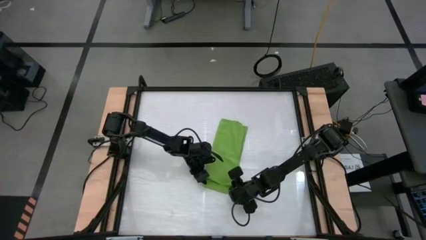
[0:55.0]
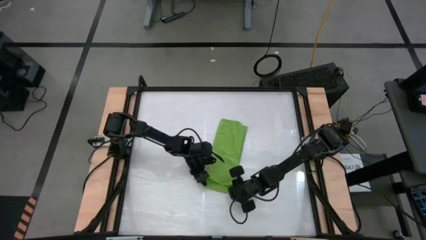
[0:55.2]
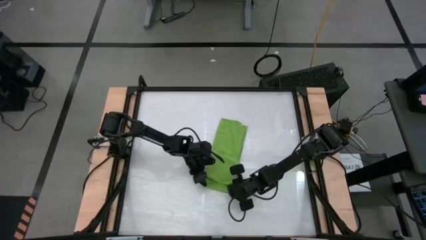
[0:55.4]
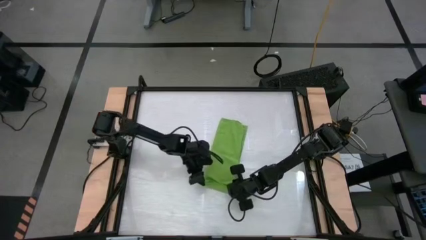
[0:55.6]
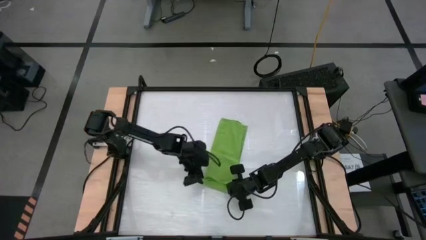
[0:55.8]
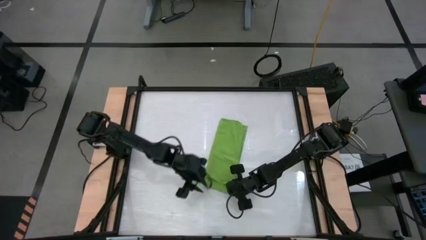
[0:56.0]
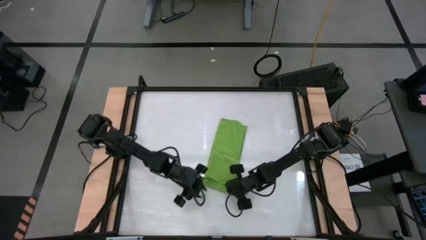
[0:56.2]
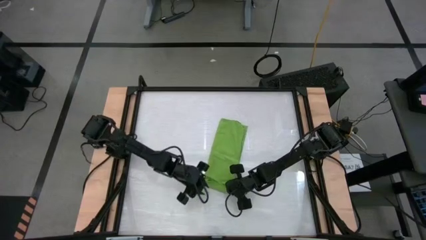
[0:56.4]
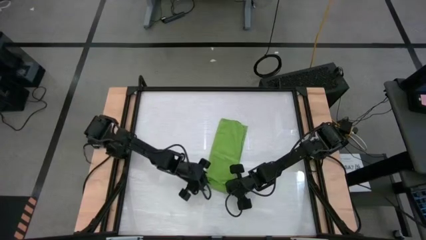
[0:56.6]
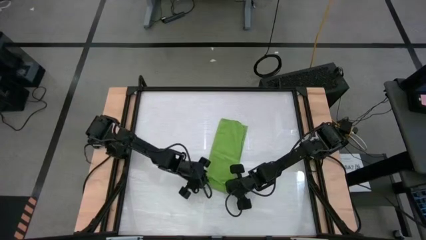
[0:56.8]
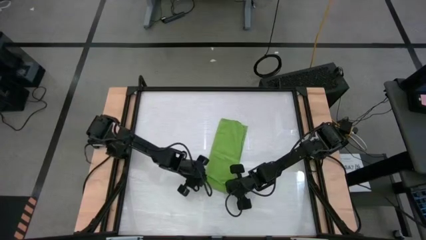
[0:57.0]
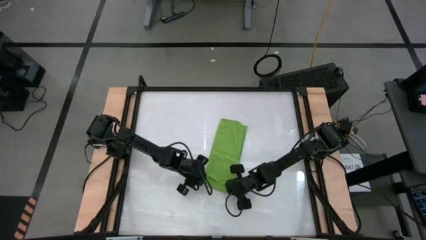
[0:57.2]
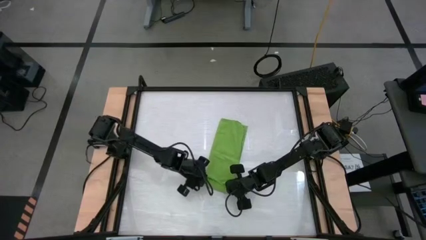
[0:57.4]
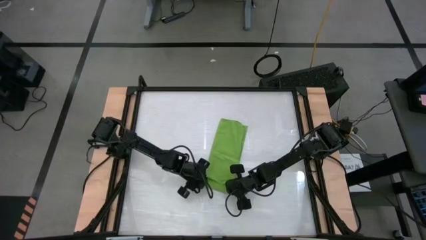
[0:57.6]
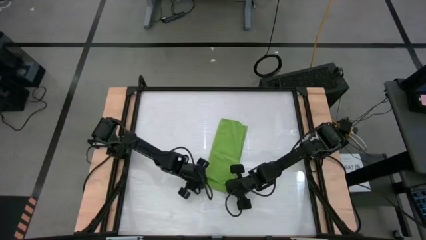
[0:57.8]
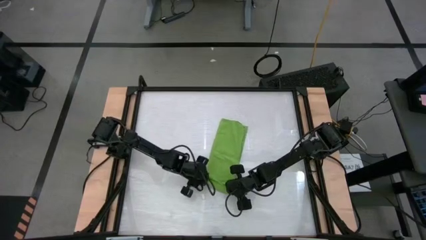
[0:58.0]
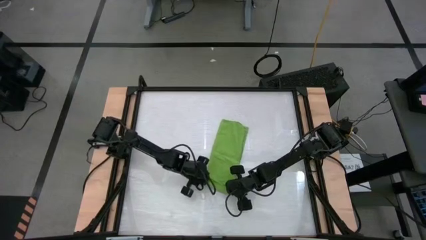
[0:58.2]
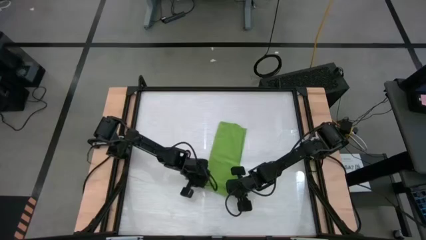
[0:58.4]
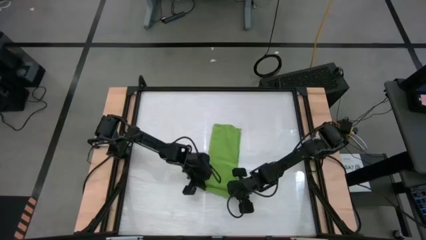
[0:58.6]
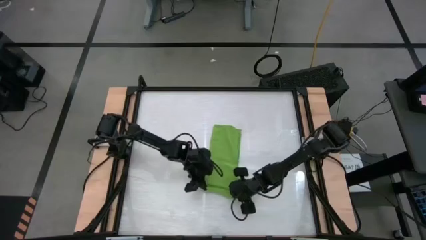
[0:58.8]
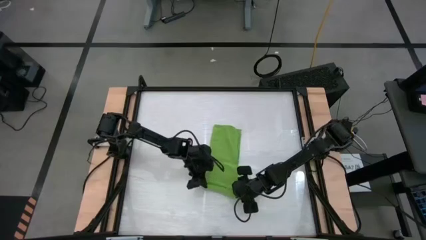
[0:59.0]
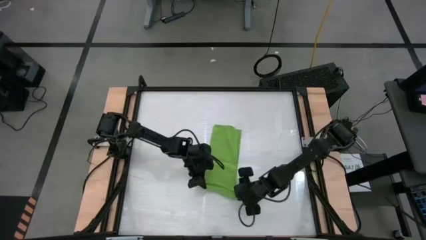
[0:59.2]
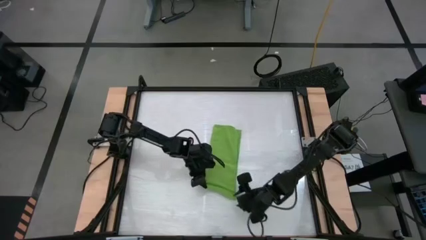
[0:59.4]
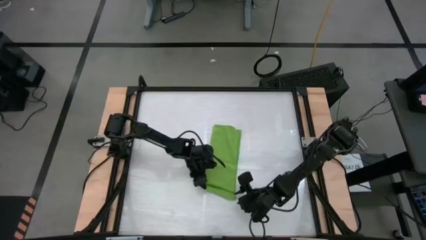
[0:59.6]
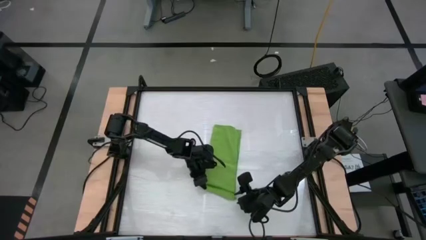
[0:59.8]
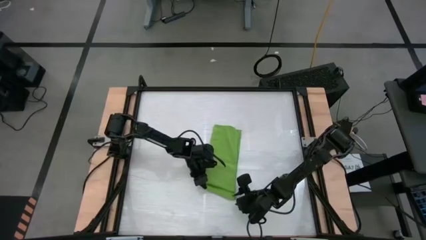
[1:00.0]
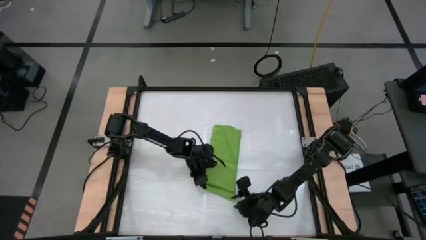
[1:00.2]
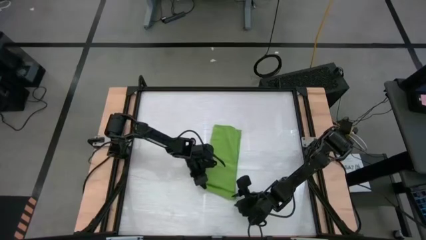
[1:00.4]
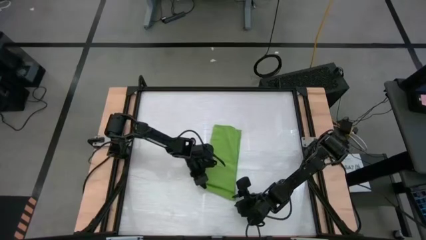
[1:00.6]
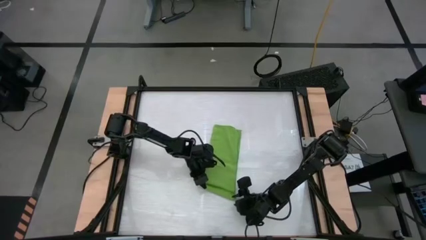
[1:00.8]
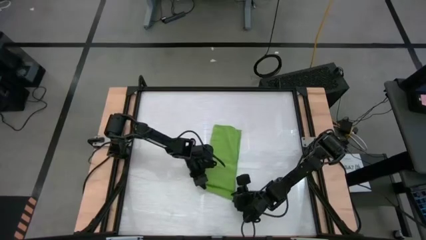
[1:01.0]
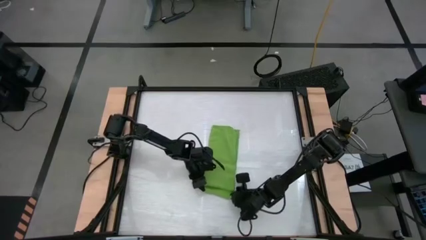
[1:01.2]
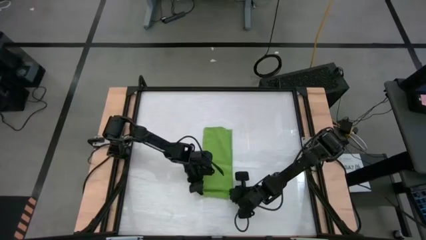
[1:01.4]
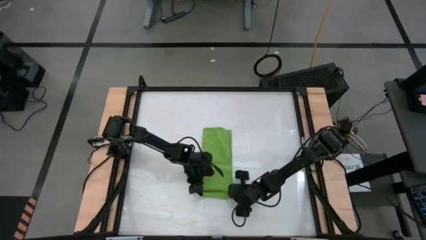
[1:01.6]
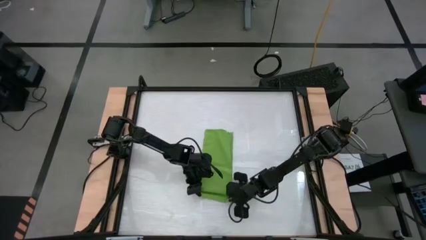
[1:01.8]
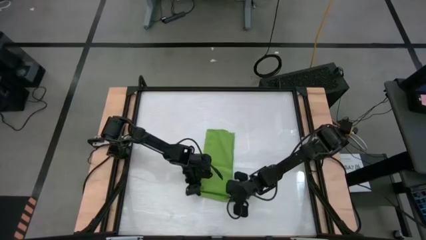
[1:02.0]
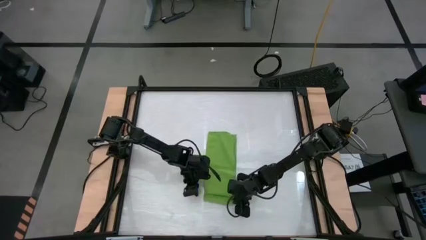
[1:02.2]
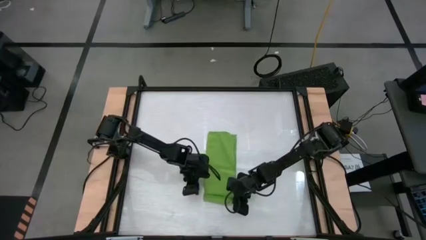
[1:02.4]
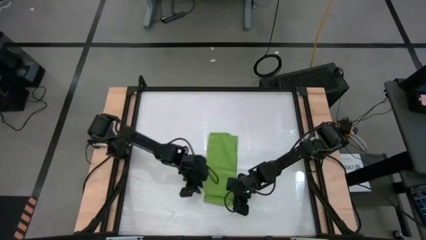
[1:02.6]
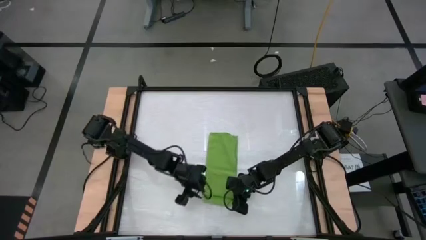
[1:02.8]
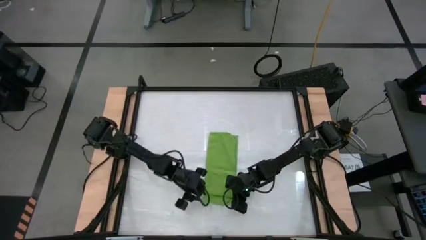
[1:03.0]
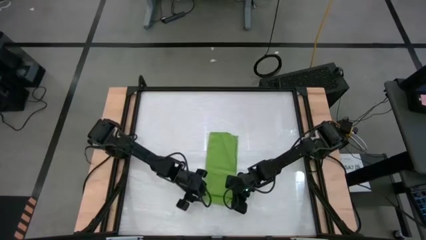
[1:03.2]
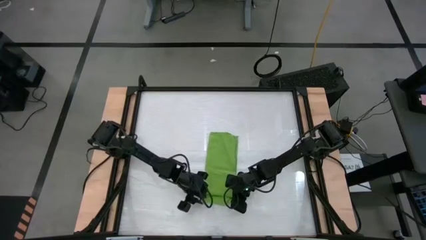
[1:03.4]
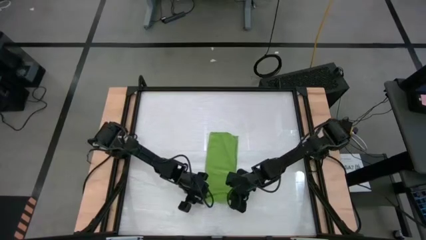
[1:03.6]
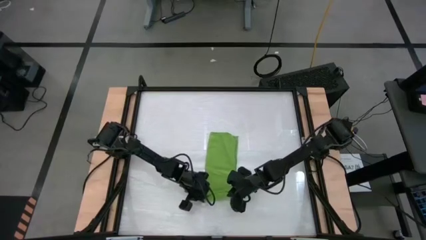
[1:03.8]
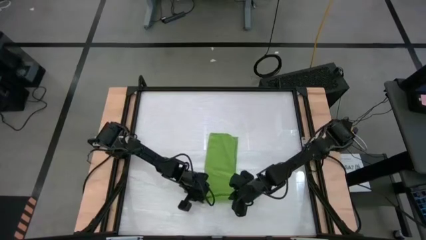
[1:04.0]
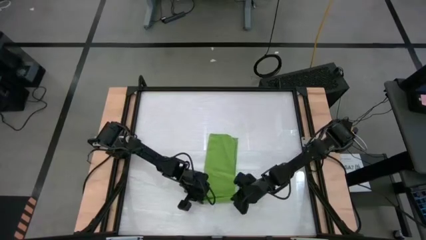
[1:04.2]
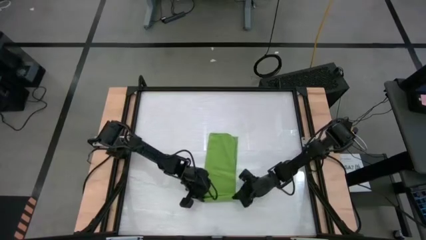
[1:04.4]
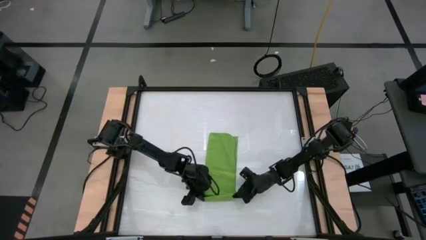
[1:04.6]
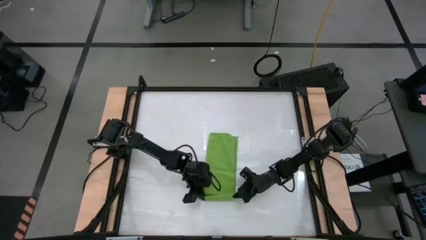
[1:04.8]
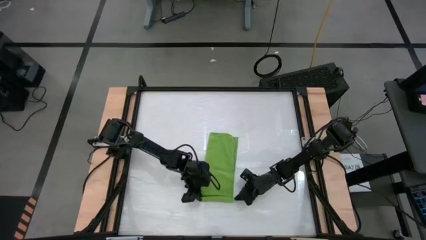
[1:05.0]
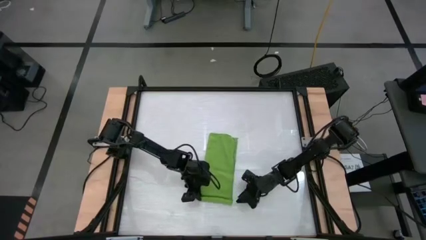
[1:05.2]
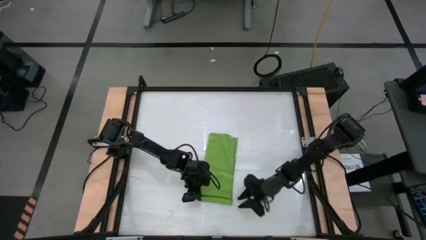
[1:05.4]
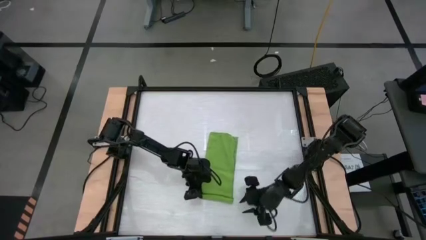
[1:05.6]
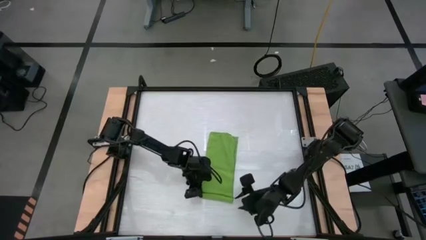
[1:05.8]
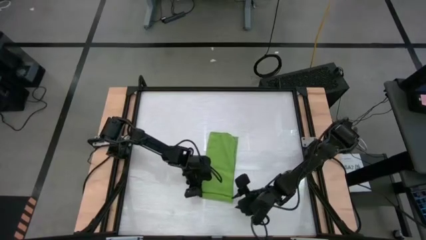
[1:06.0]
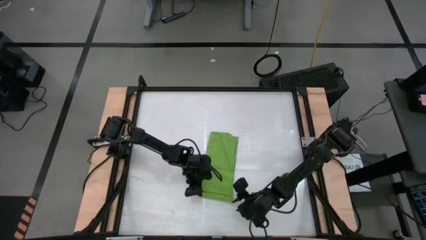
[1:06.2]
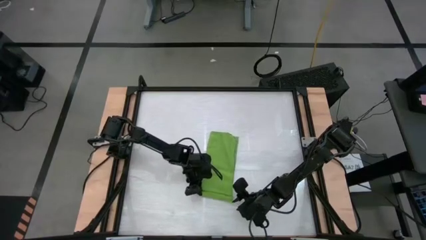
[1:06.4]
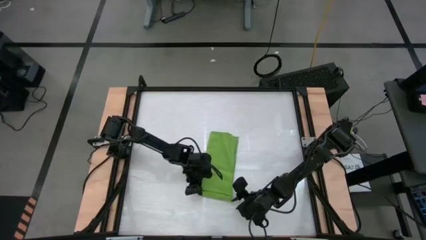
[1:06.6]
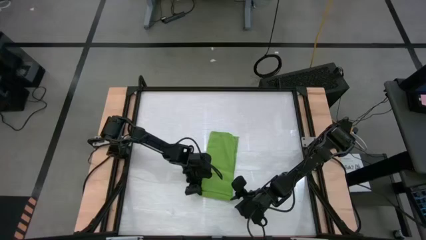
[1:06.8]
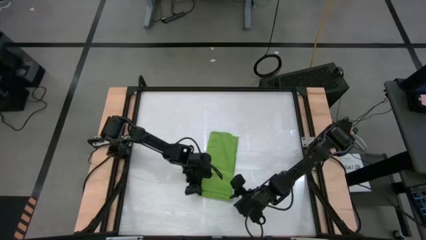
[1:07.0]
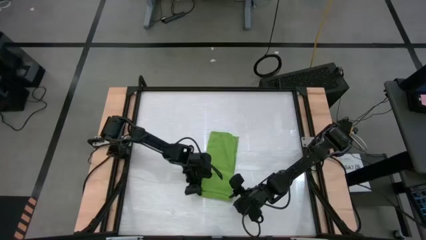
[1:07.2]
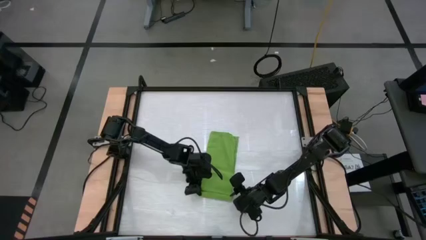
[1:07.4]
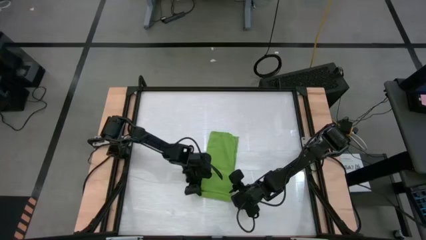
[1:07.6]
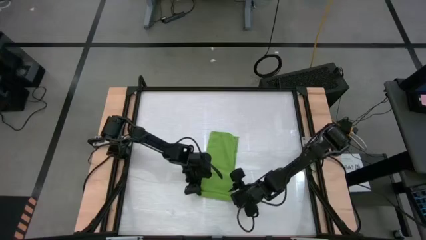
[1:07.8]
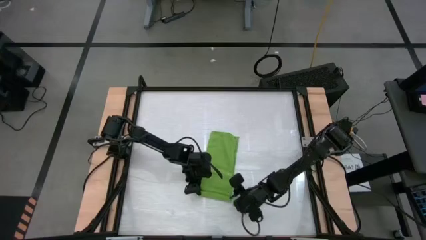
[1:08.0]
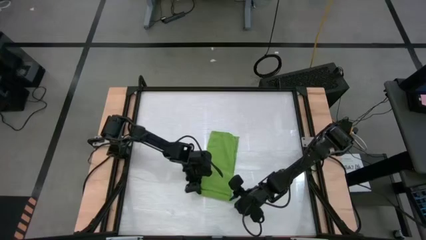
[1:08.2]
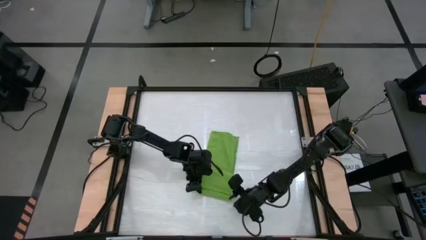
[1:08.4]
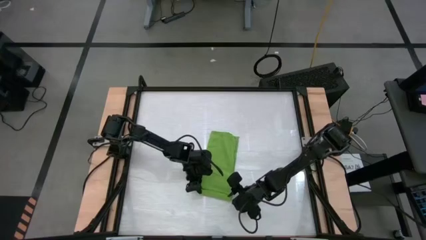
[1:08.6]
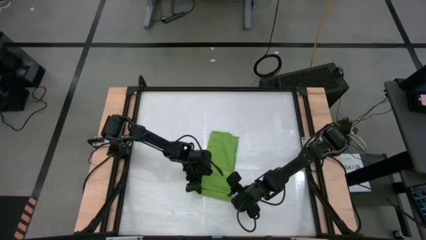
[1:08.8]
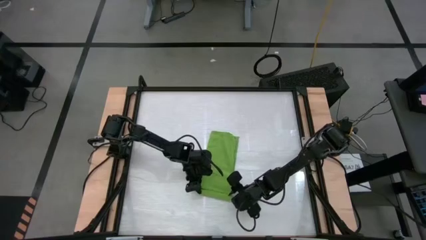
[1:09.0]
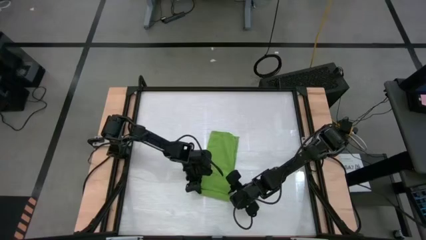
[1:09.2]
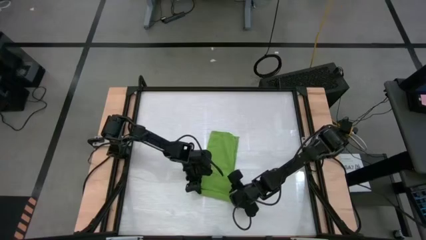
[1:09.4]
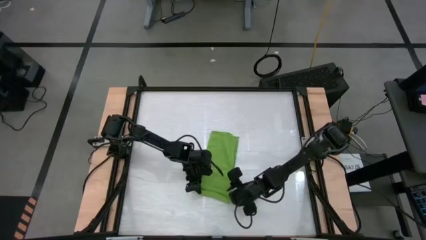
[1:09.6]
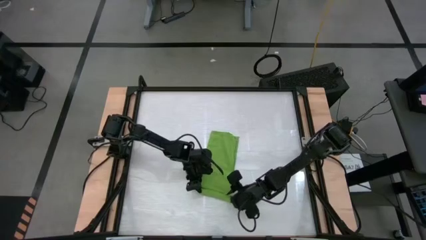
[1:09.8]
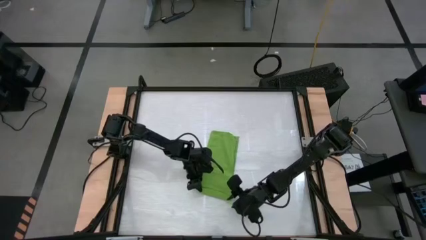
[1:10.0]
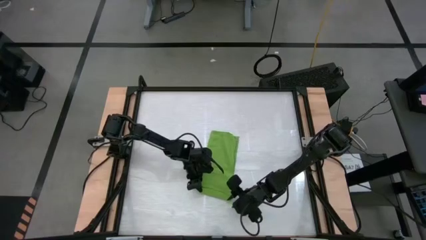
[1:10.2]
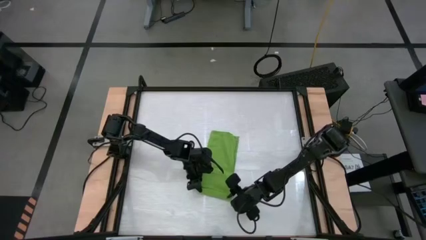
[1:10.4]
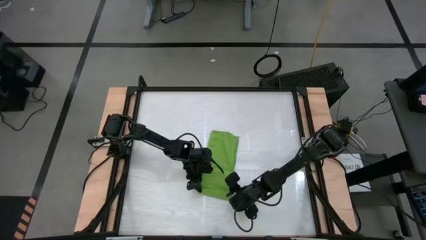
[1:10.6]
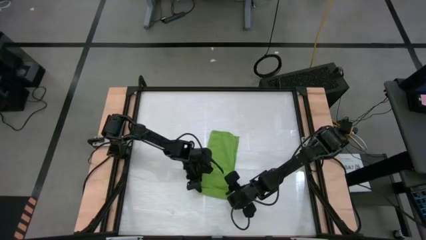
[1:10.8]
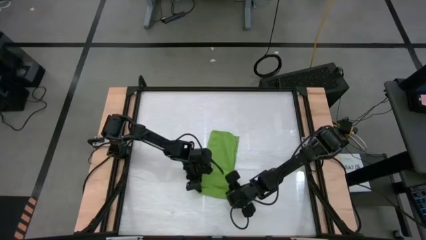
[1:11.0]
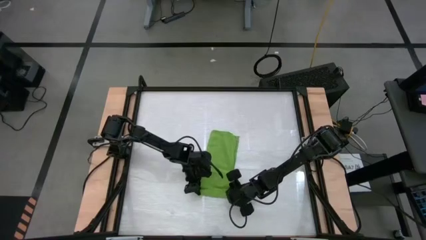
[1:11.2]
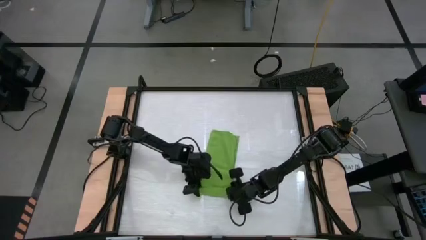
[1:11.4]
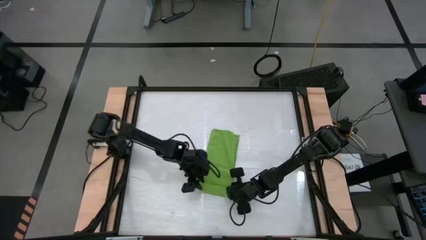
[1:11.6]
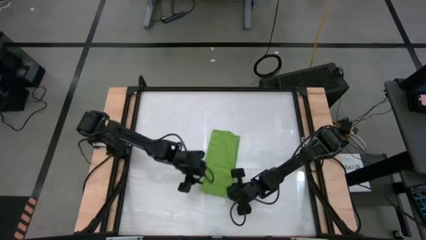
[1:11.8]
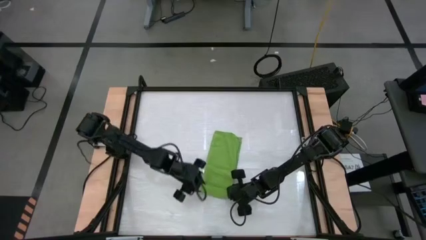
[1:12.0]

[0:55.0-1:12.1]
Task: Roll towel into tight, uniform cylinder
Roll the green towel
